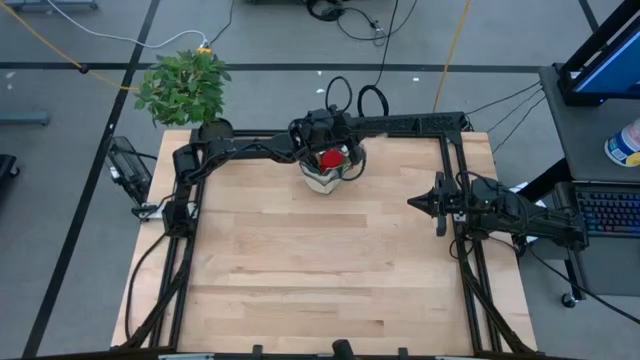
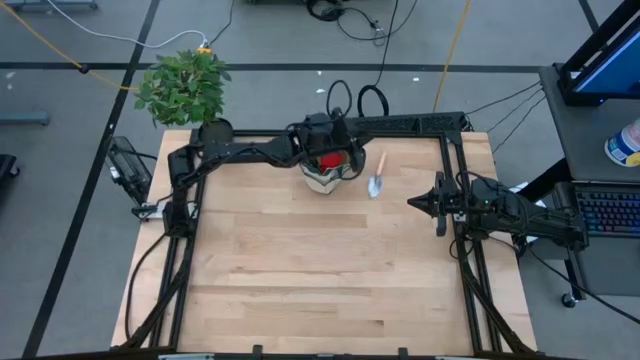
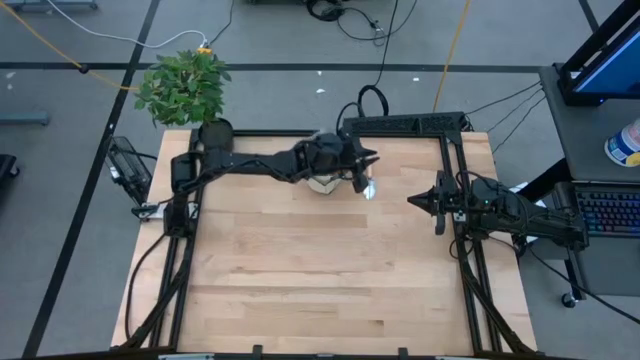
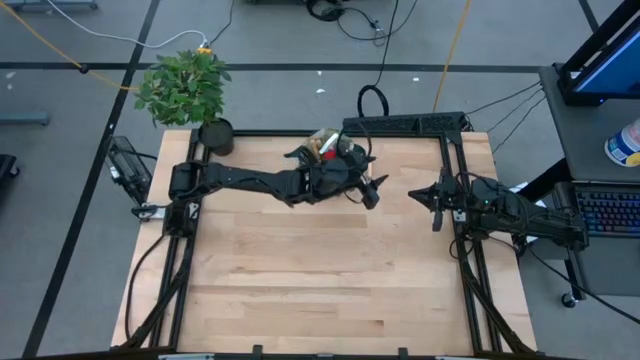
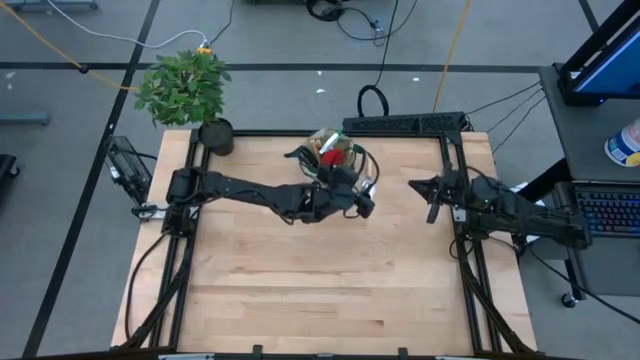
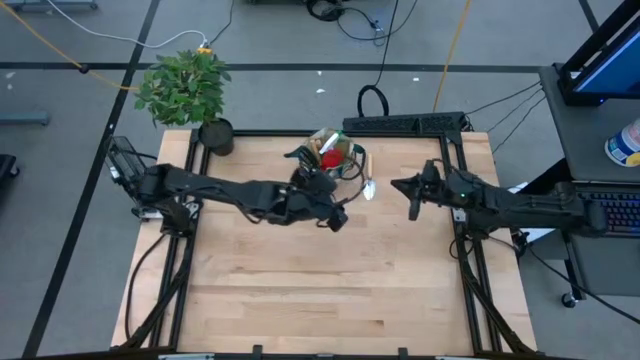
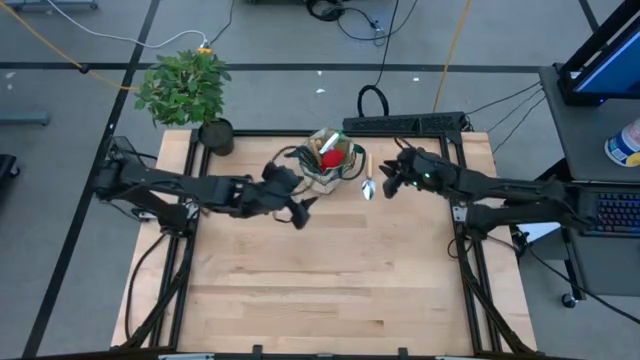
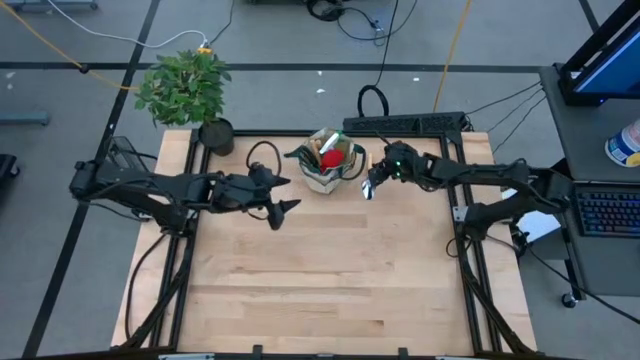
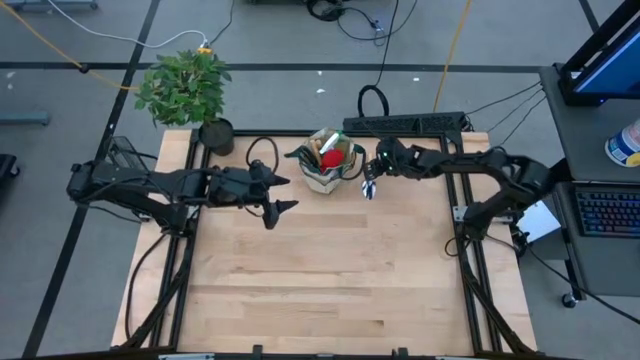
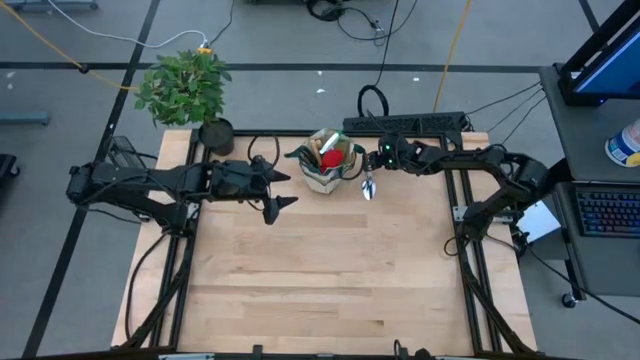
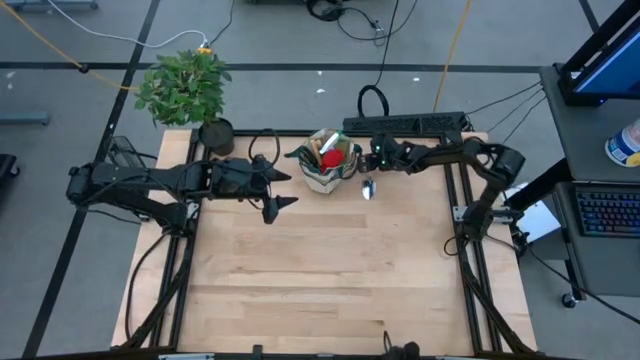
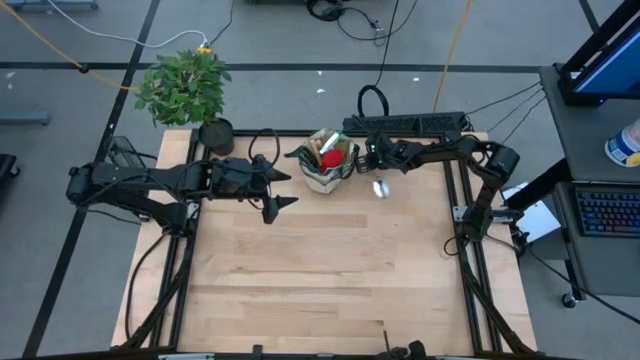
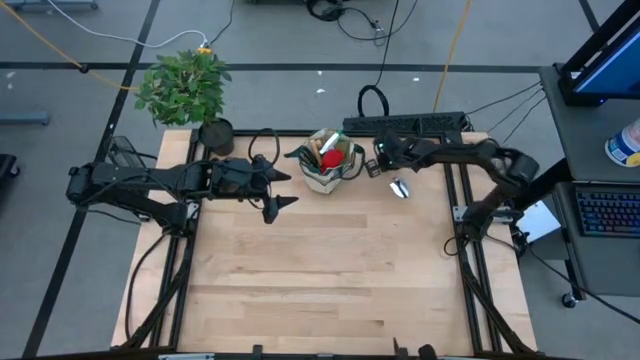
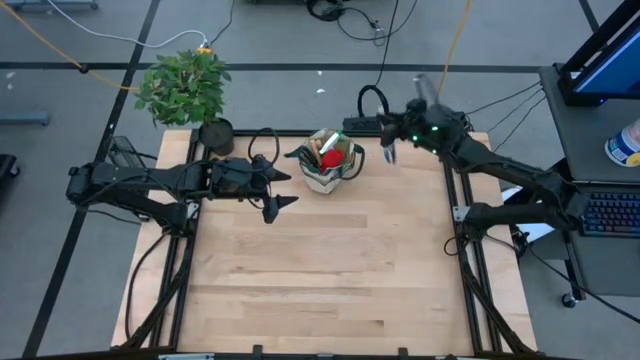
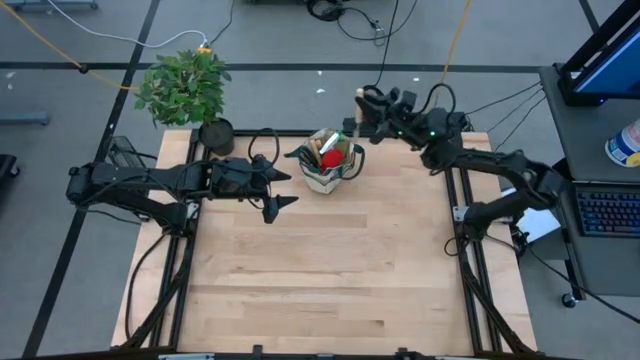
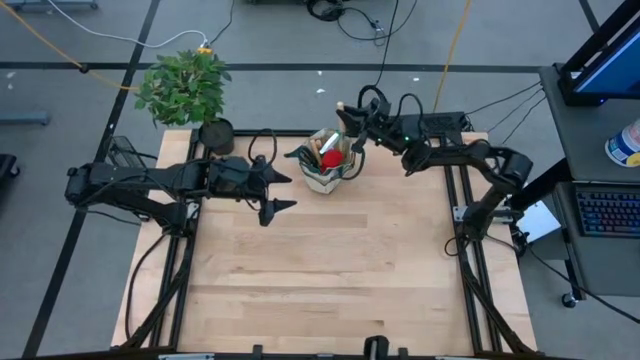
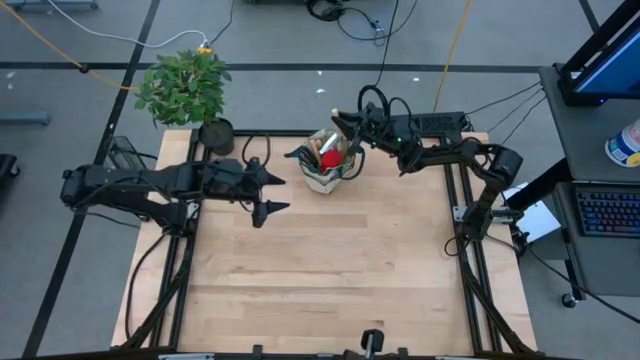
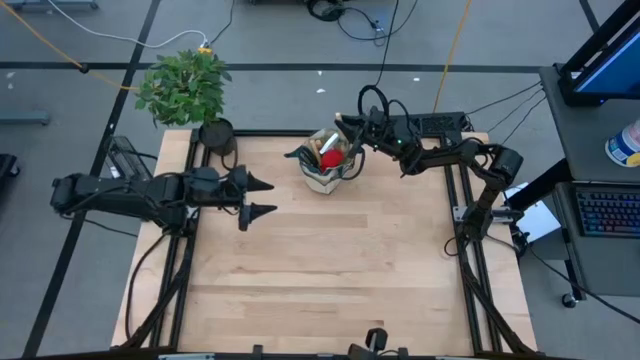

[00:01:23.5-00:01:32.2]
Task: Pick & Place Garden tools in Gardening bag
Put the hand trowel into the gardening tool bag

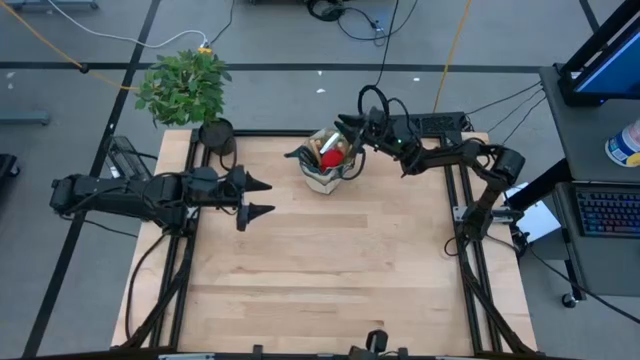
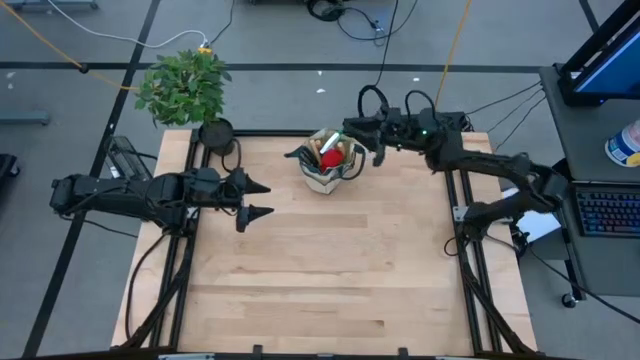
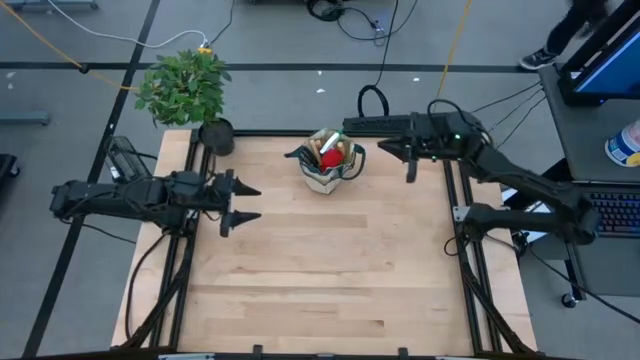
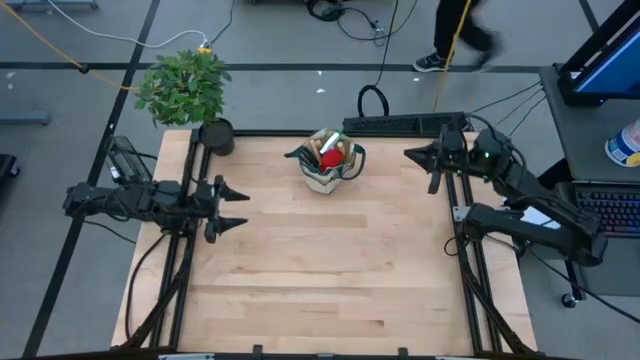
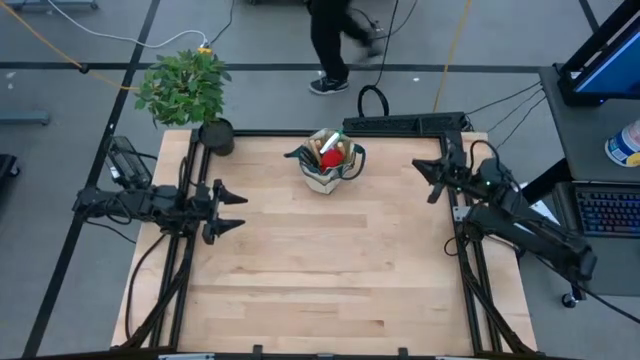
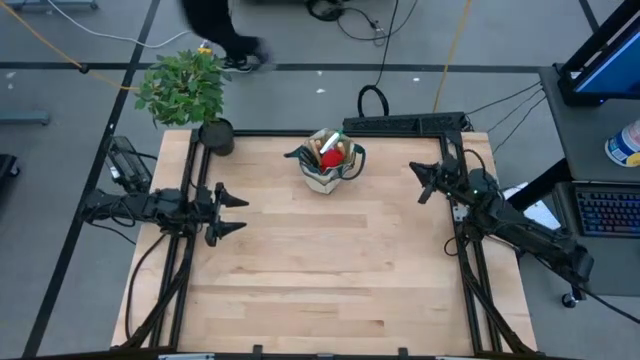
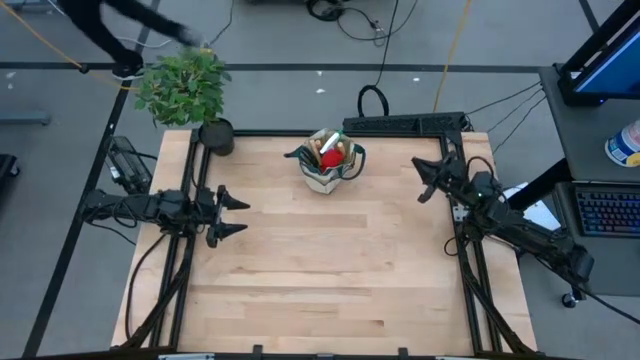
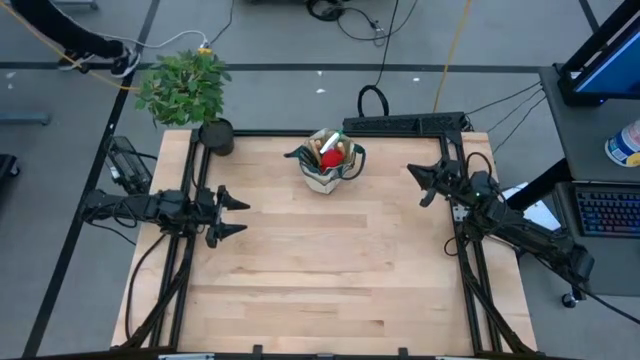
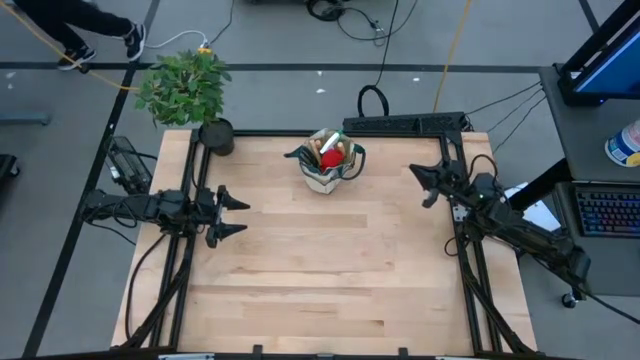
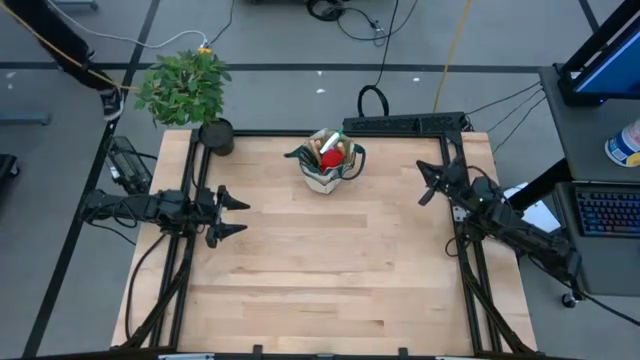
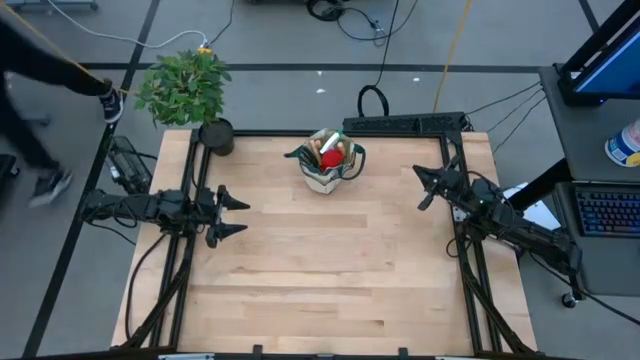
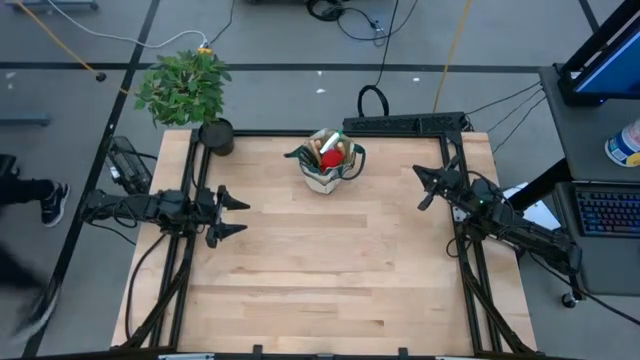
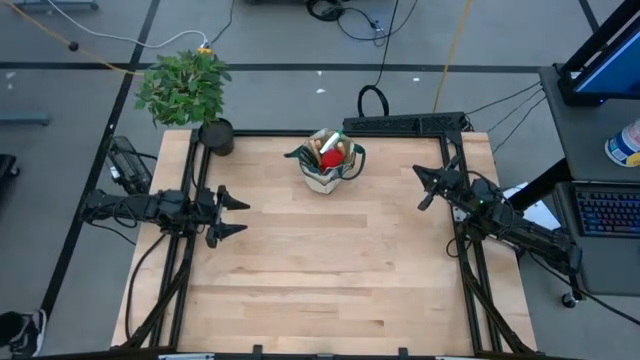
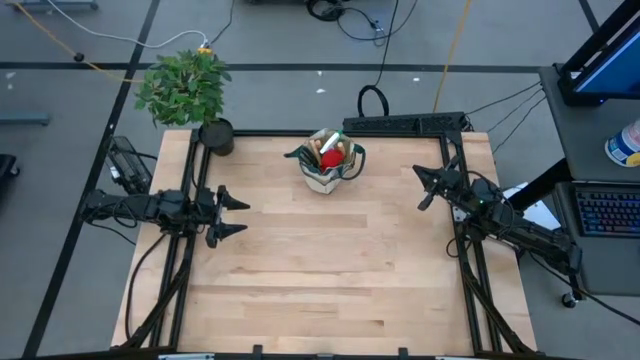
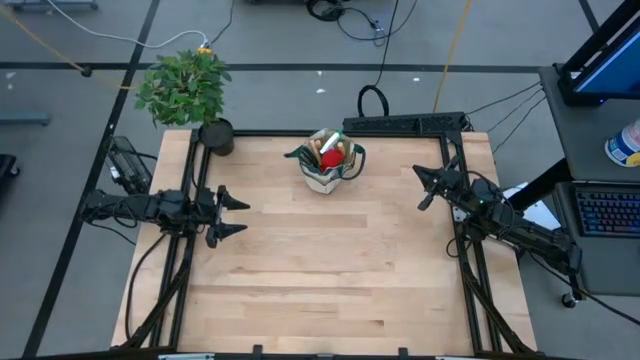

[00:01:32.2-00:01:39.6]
Return to Home Position

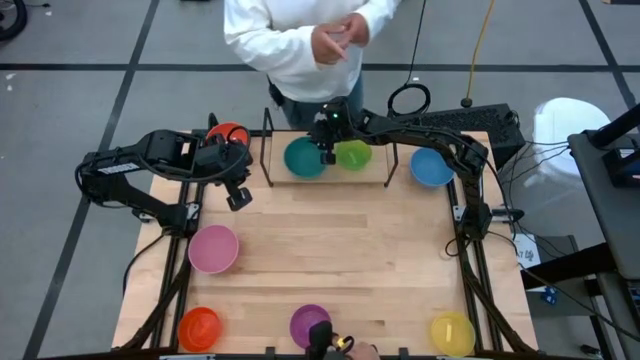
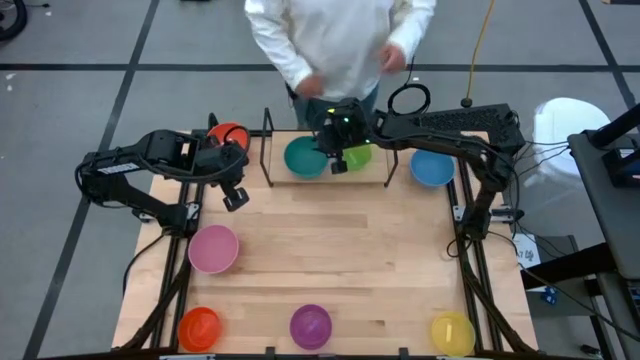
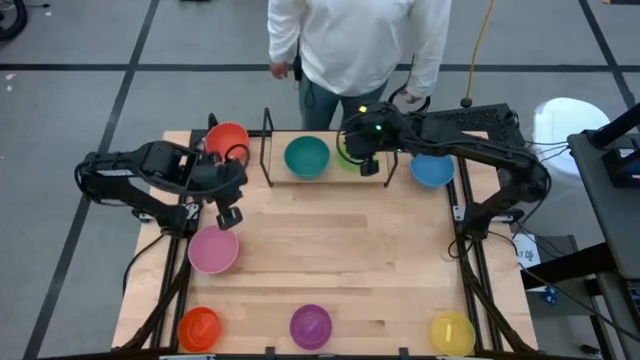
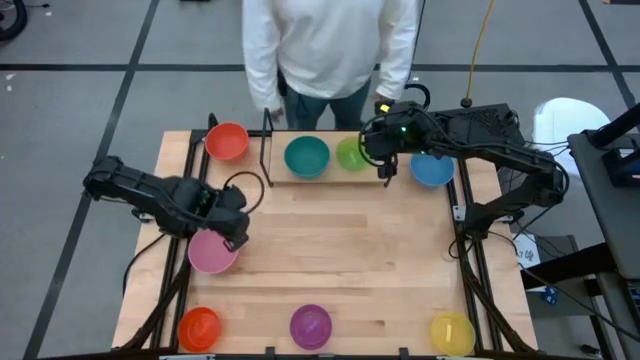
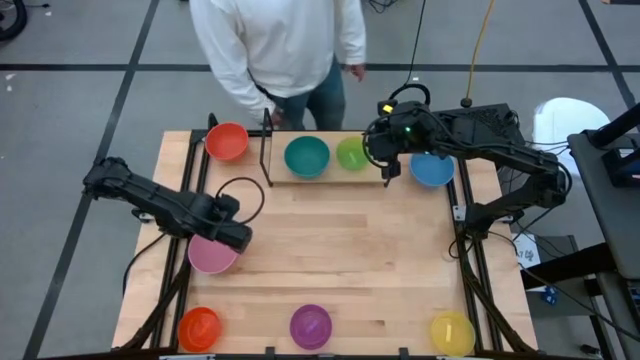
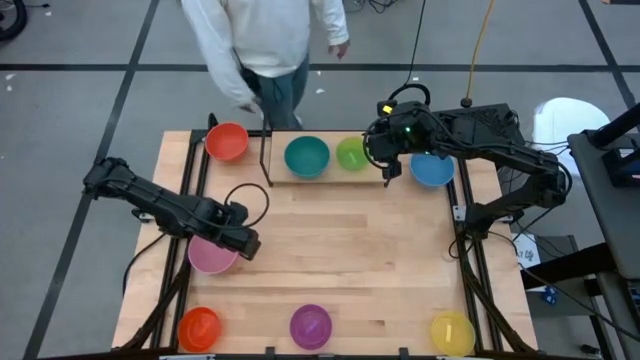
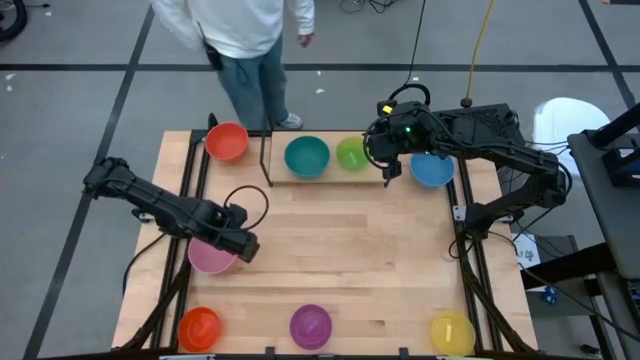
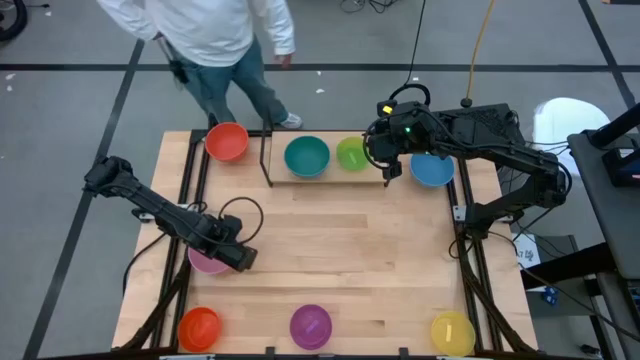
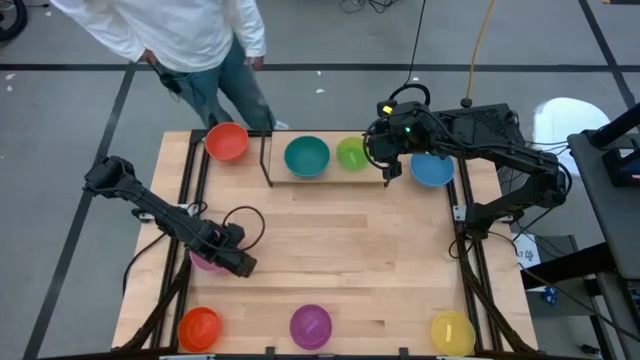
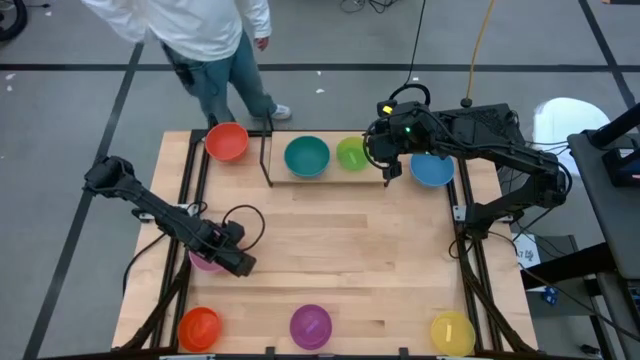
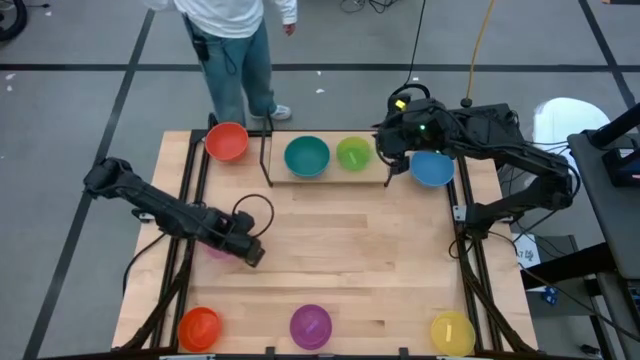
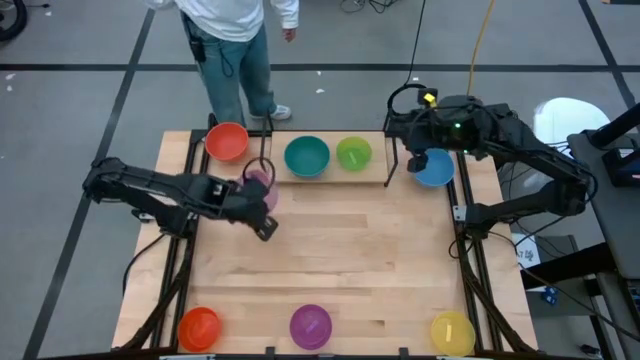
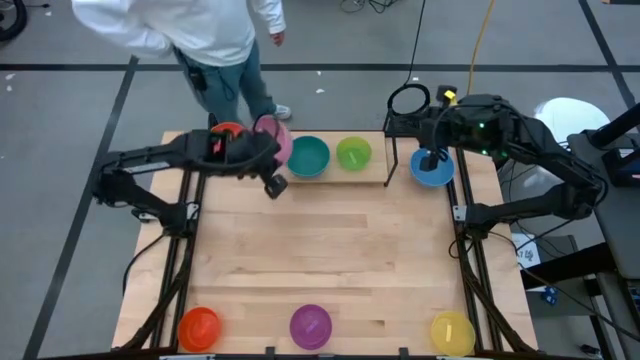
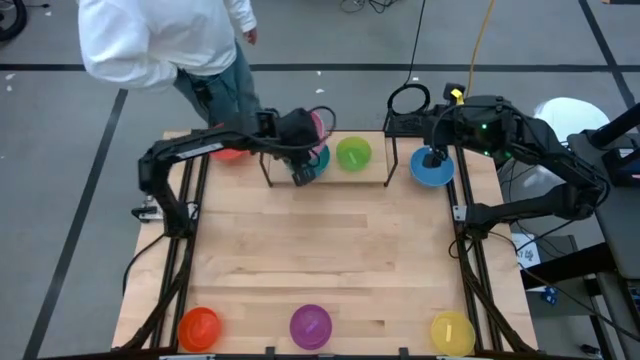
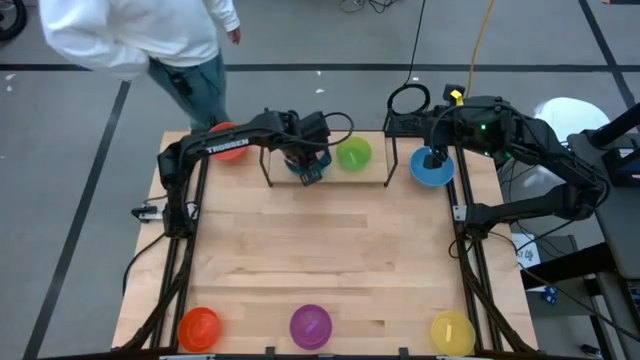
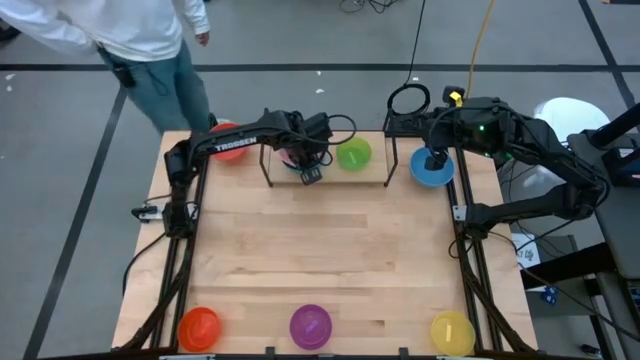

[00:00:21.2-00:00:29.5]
Task: Place and stack bowls onto a shelf
Stack the pink bowl on top of the green bowl on the shelf
